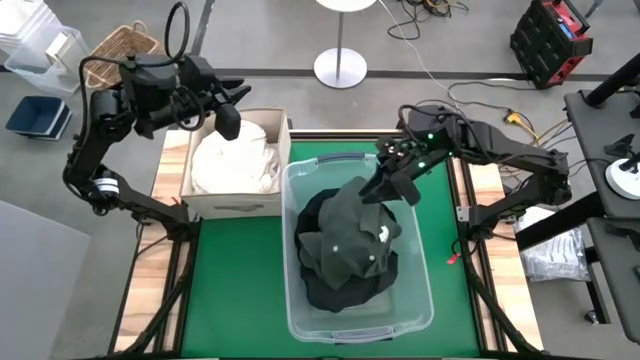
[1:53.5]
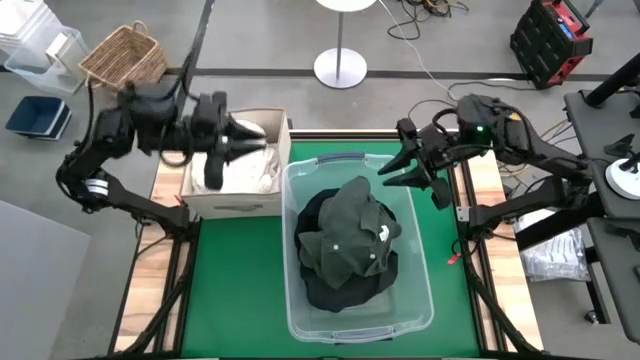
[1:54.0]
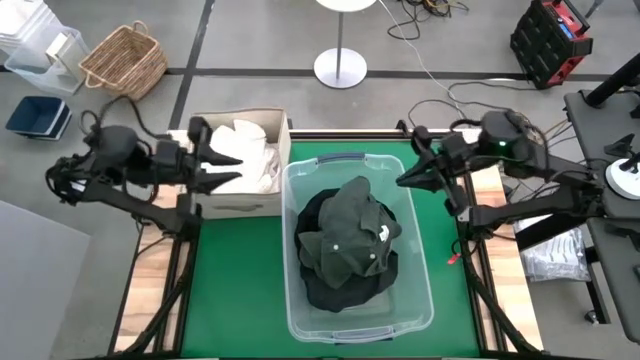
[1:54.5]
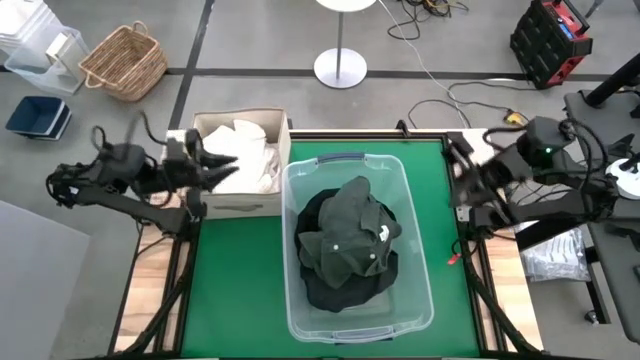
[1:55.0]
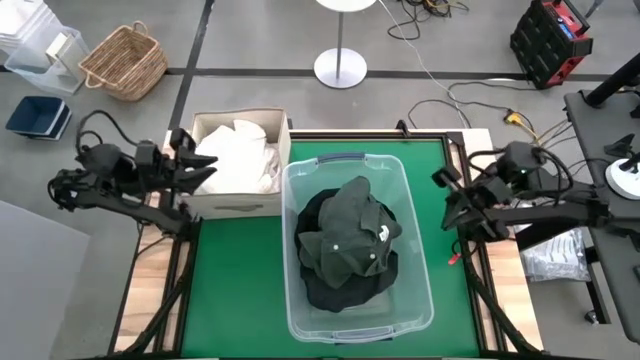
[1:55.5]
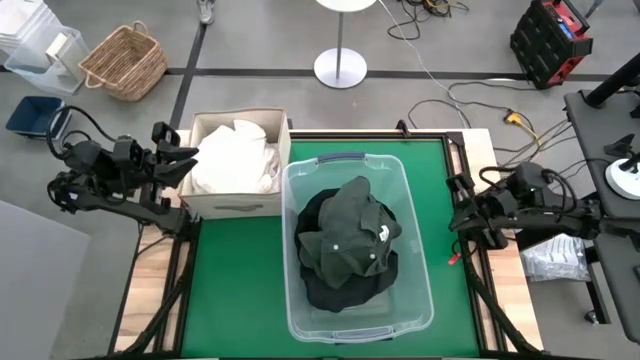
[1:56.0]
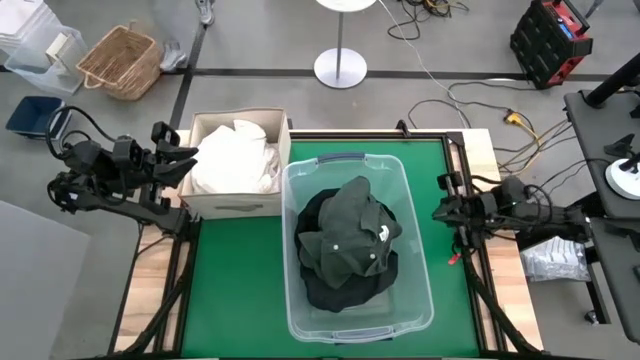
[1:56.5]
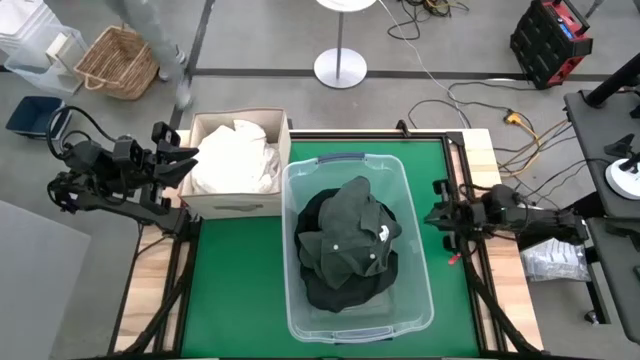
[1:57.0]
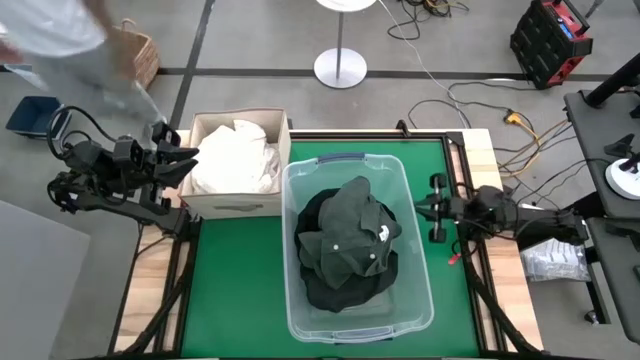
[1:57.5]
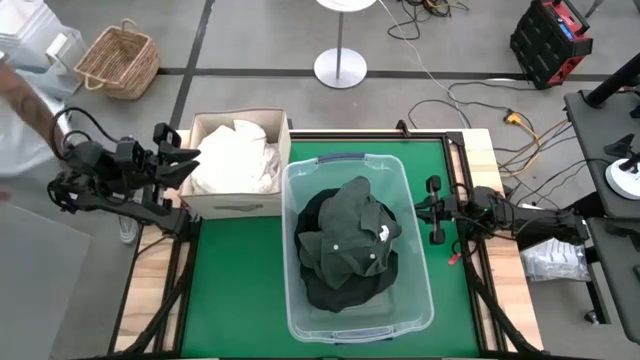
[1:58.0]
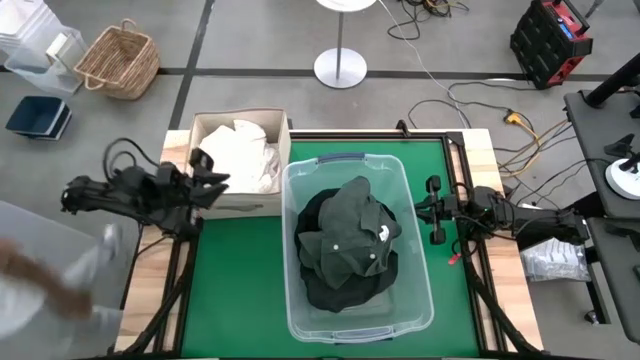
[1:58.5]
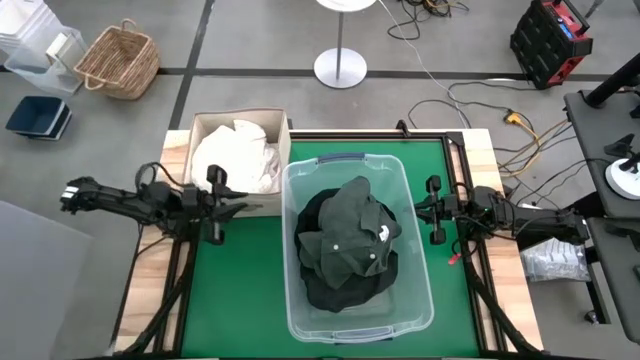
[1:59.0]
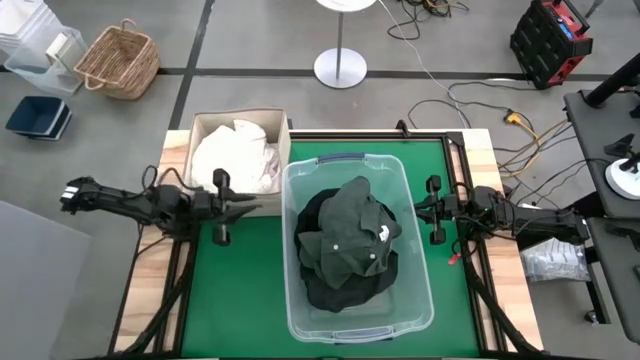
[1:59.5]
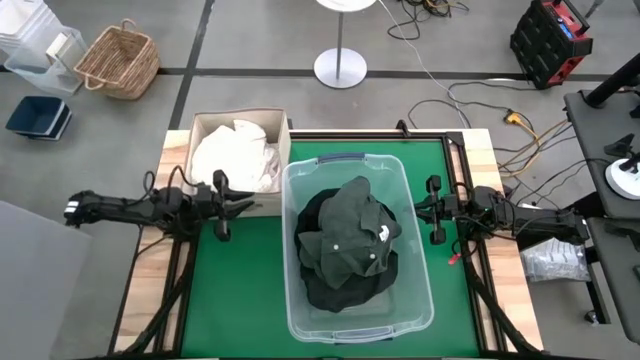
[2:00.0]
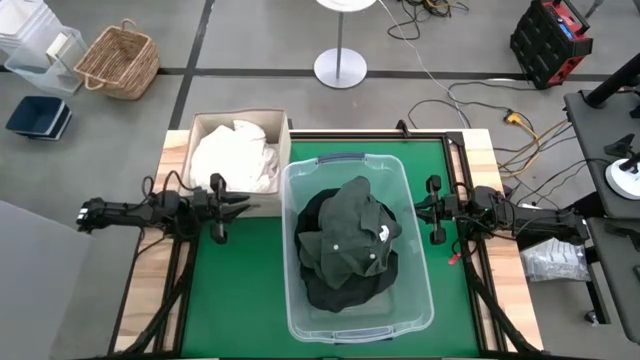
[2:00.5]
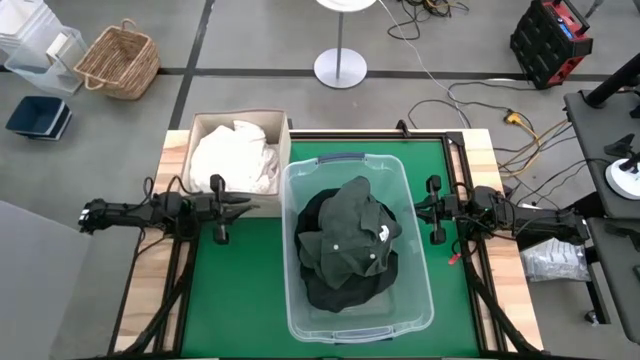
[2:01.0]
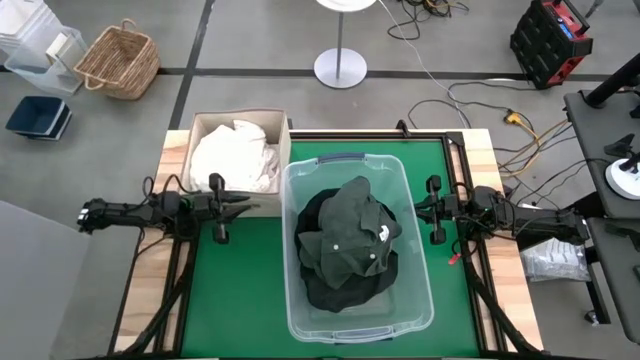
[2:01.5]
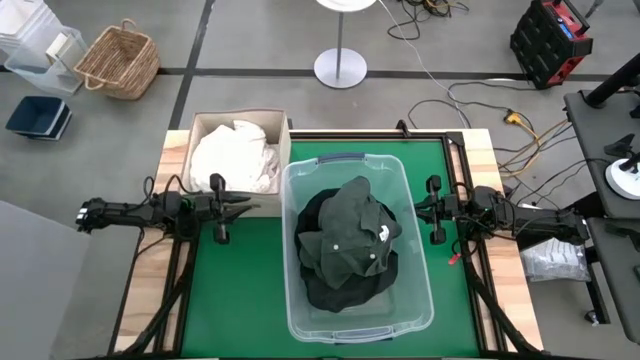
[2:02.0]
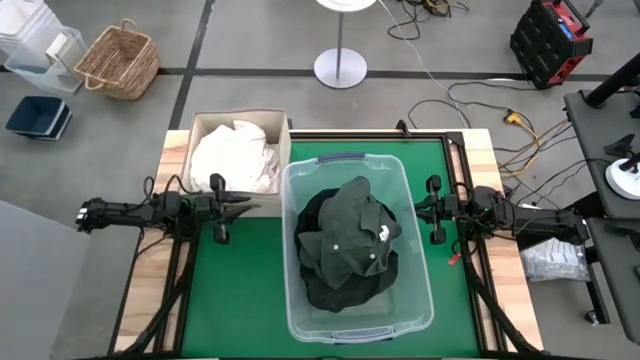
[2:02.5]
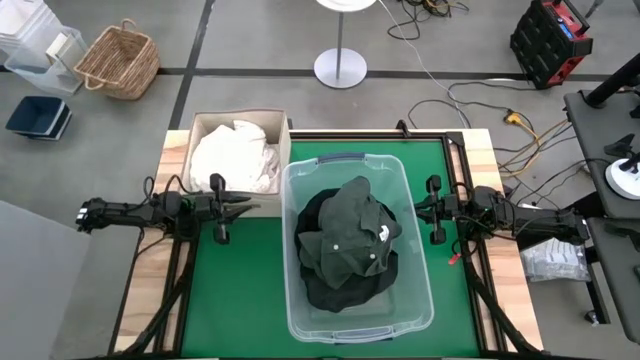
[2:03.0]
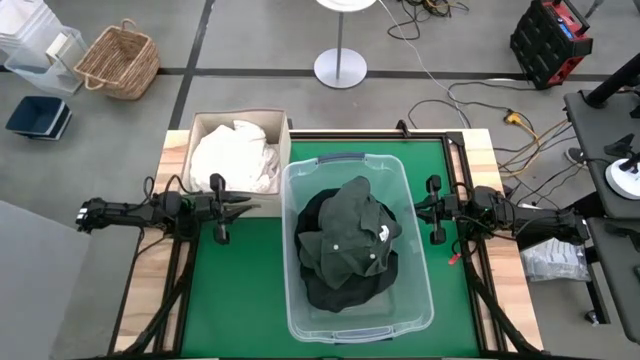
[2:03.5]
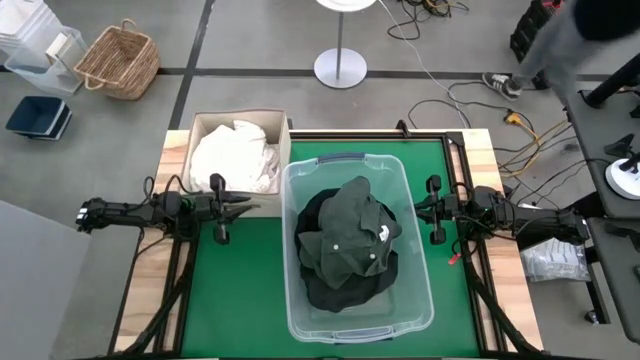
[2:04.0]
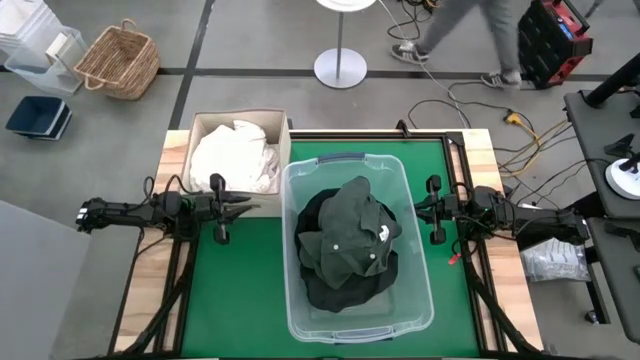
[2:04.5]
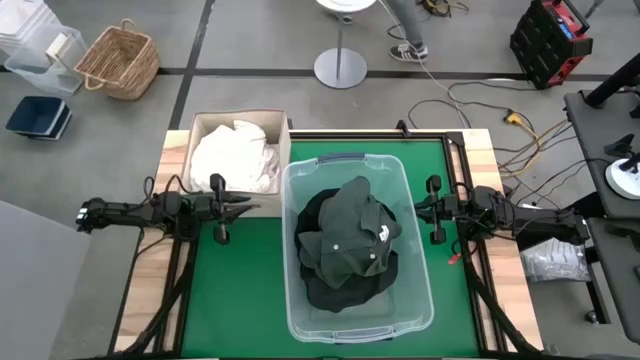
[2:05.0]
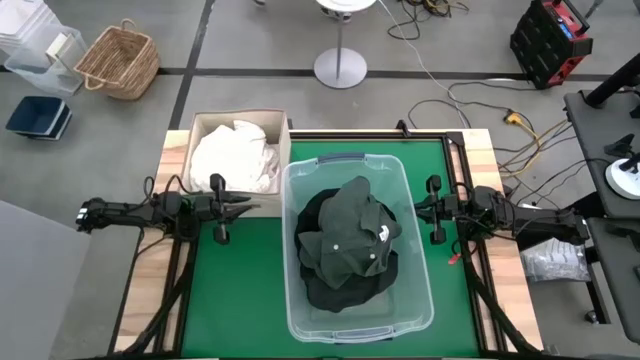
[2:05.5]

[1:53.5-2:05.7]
Task: Sort clothes
Return to Home Position

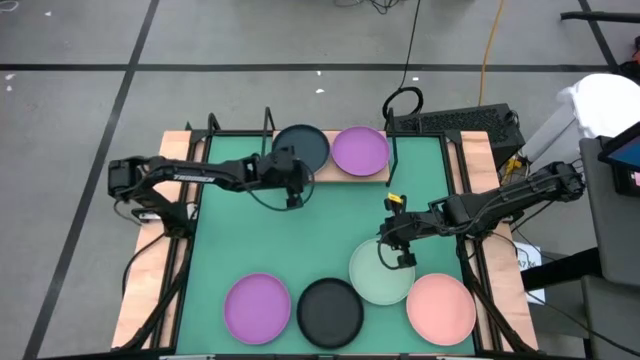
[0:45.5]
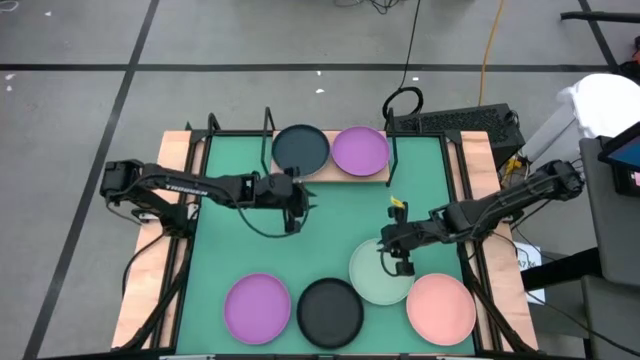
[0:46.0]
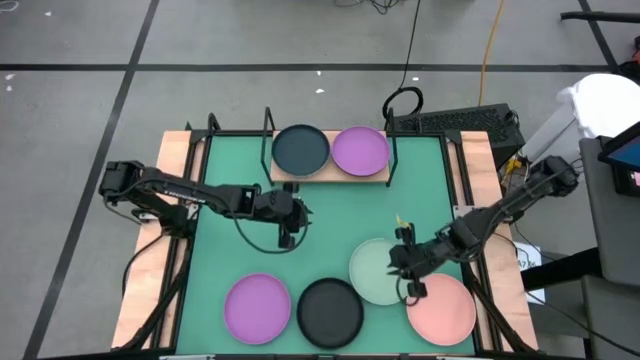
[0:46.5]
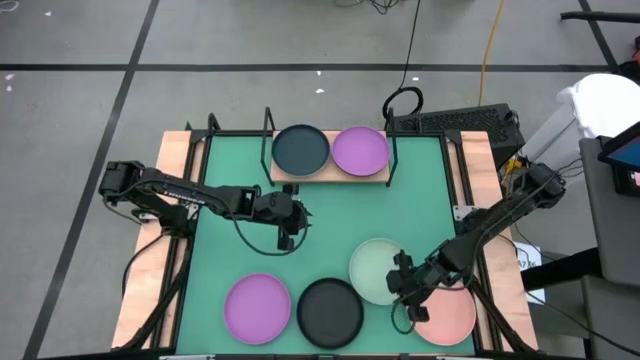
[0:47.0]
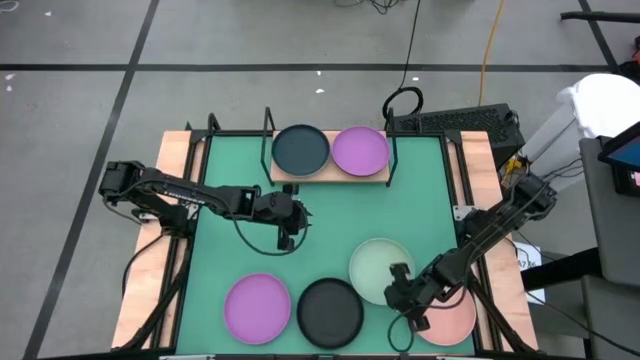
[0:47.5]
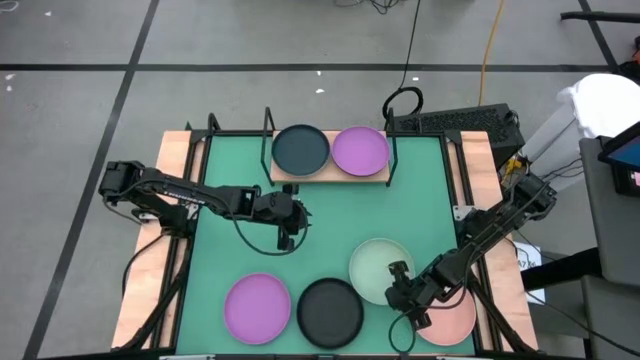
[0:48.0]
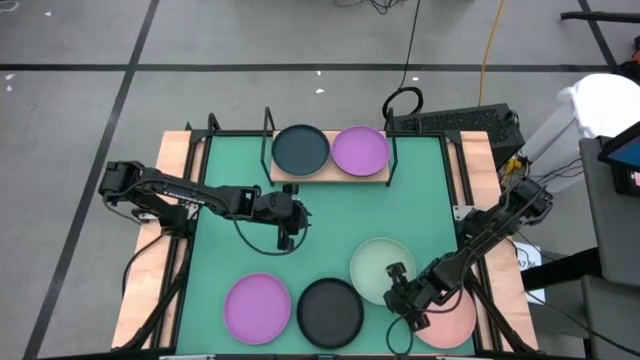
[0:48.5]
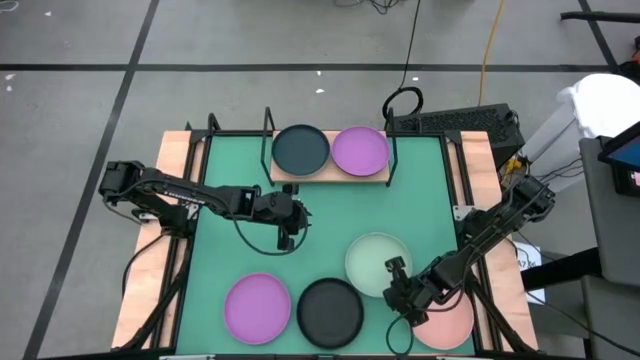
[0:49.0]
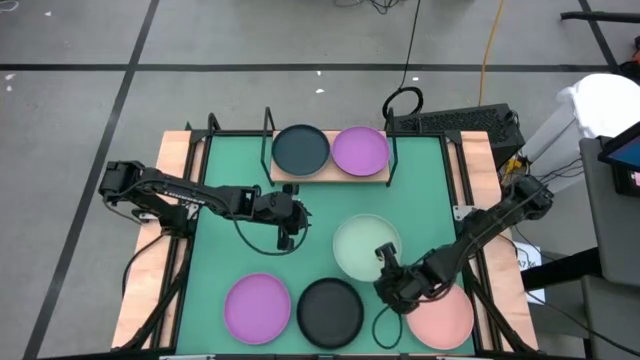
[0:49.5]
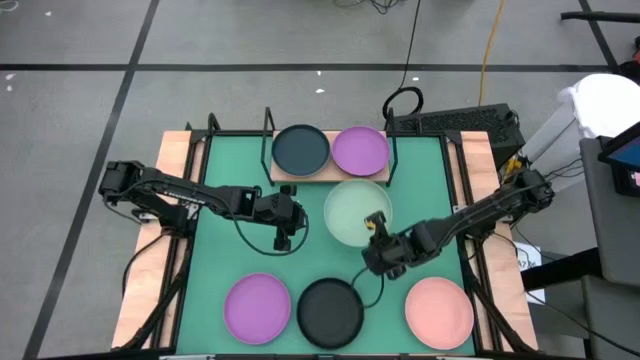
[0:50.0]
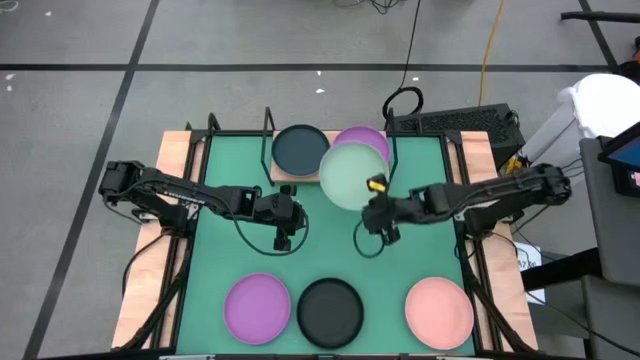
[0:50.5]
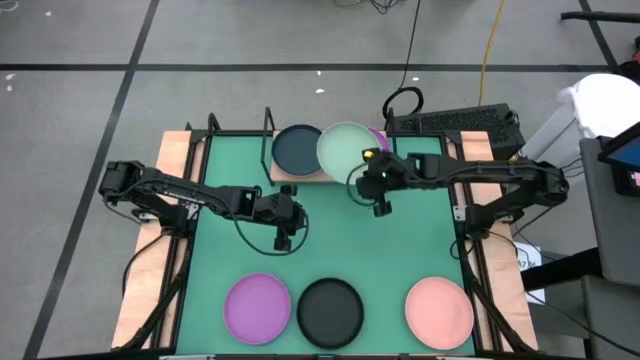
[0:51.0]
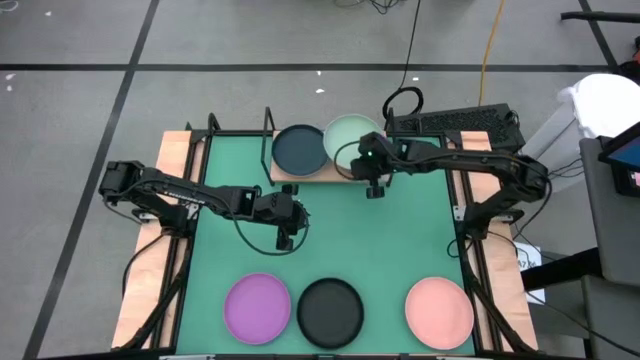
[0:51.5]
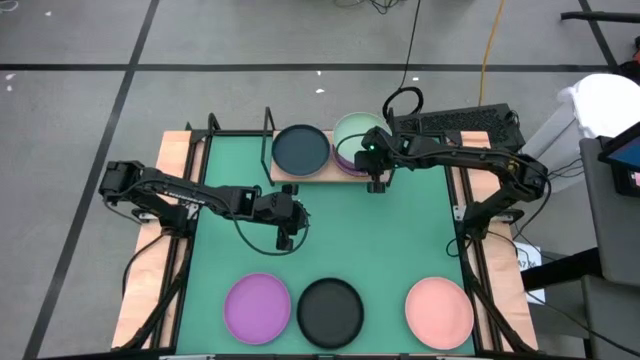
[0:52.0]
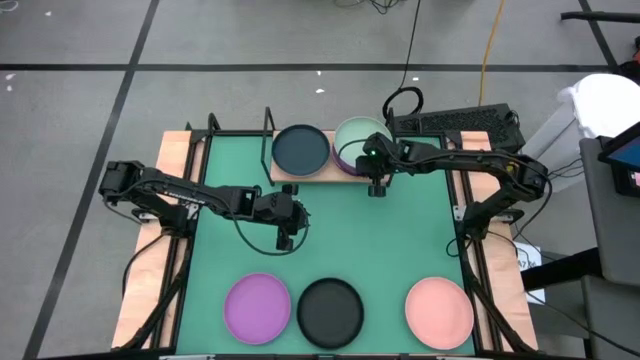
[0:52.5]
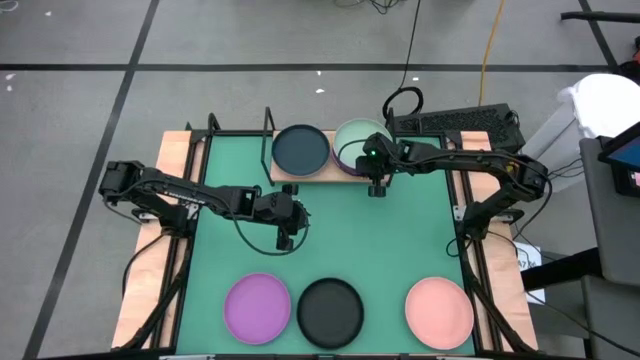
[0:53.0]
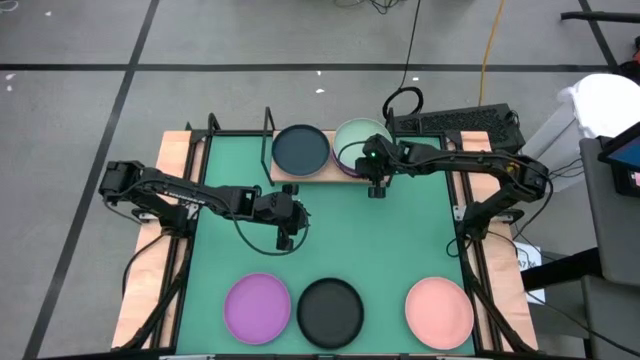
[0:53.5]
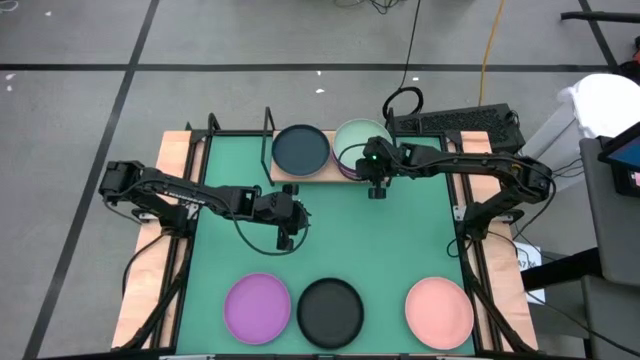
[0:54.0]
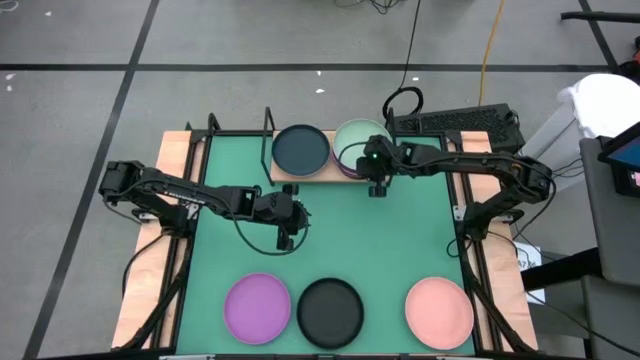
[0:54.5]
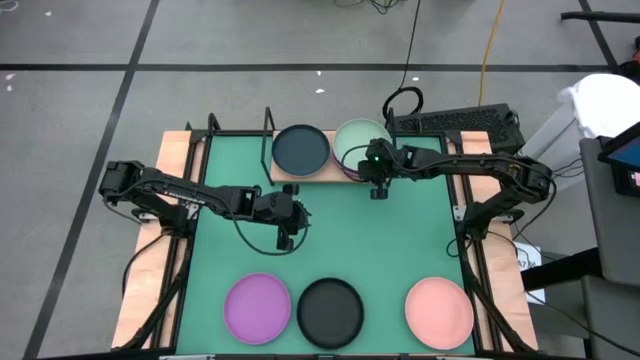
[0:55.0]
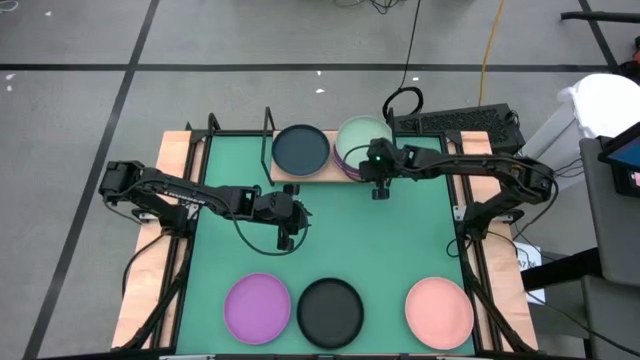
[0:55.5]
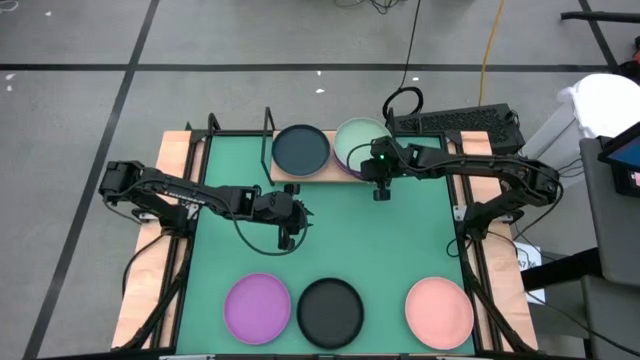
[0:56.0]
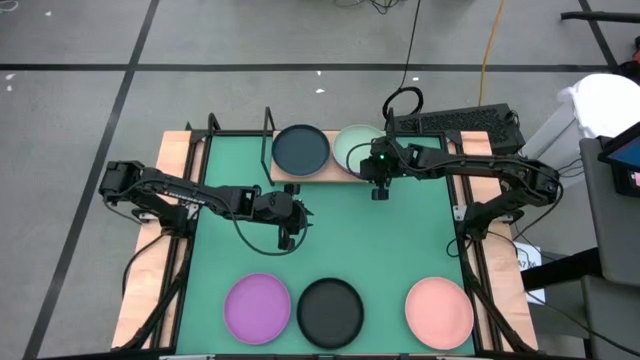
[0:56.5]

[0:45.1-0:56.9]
Task: Place and stack plates onto a shelf
Stack the light green plate on top of the purple plate on the shelf
